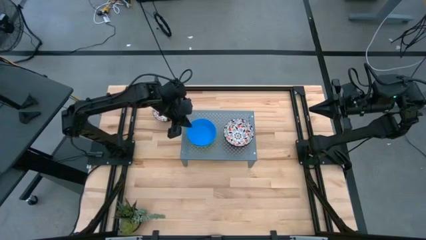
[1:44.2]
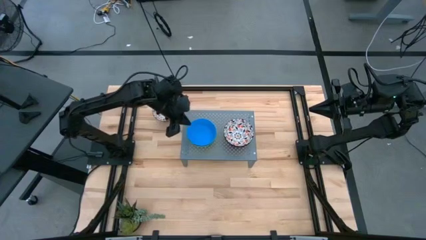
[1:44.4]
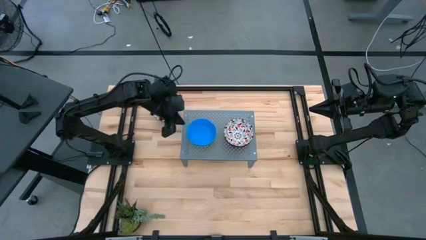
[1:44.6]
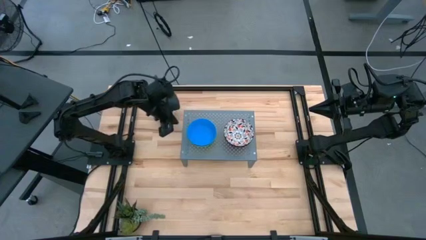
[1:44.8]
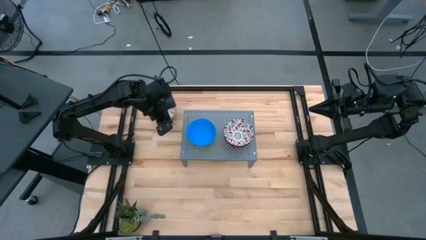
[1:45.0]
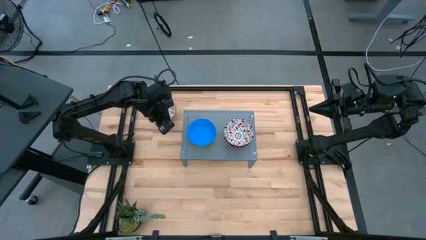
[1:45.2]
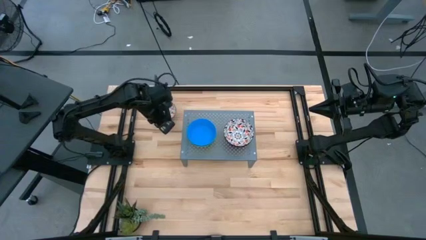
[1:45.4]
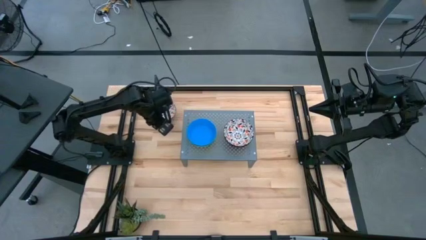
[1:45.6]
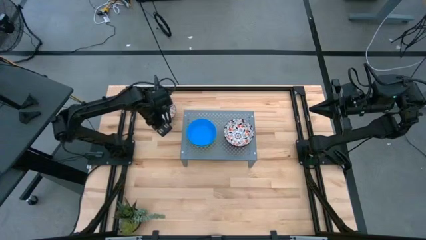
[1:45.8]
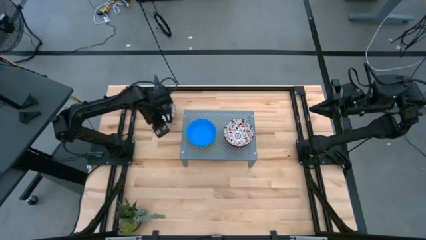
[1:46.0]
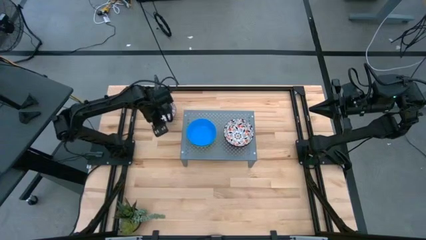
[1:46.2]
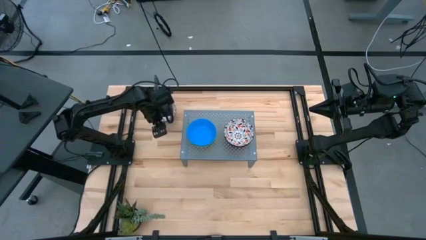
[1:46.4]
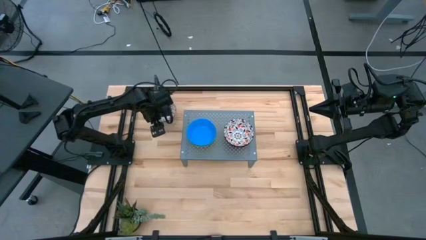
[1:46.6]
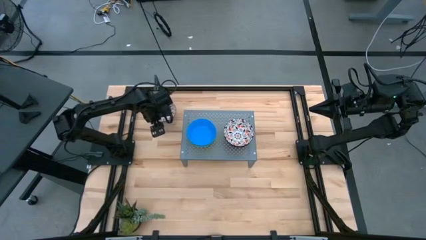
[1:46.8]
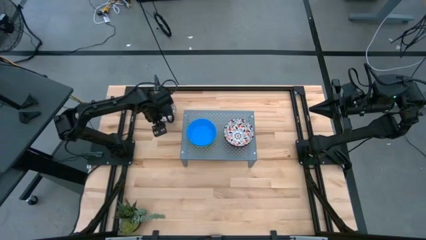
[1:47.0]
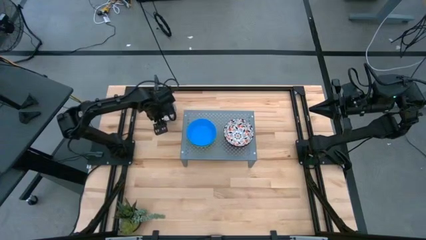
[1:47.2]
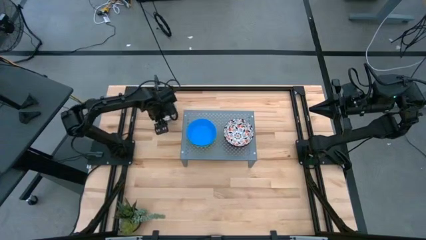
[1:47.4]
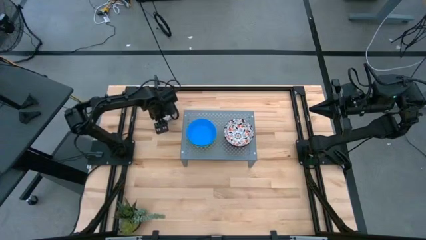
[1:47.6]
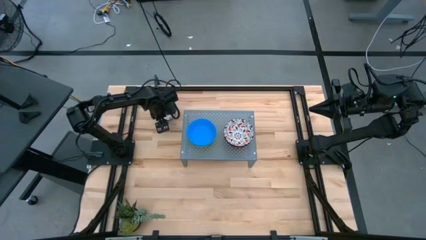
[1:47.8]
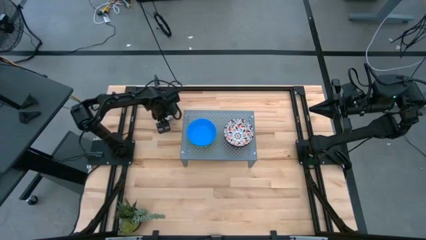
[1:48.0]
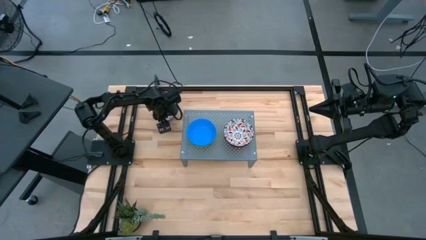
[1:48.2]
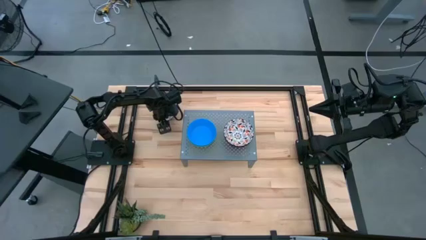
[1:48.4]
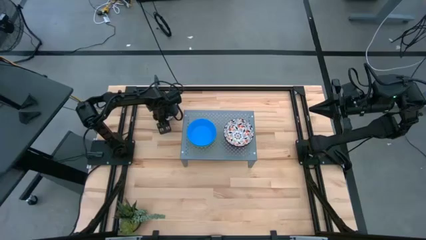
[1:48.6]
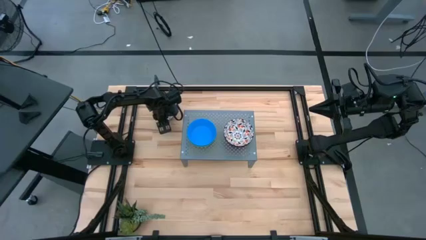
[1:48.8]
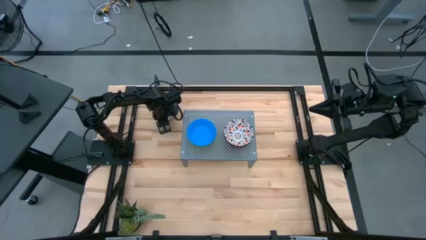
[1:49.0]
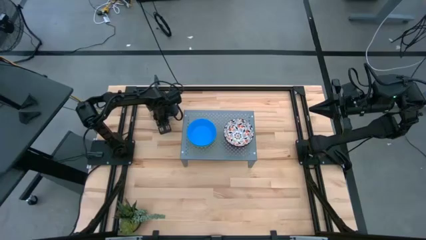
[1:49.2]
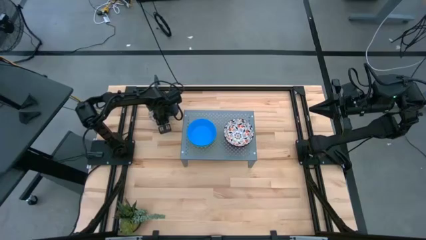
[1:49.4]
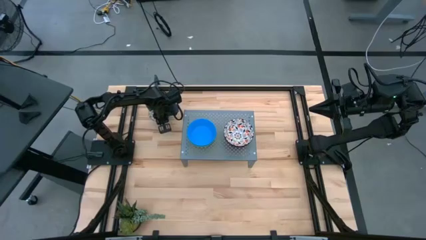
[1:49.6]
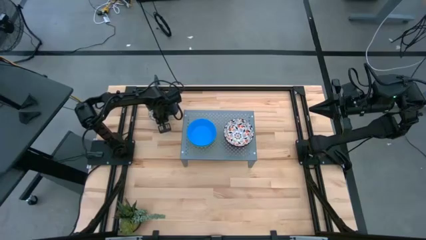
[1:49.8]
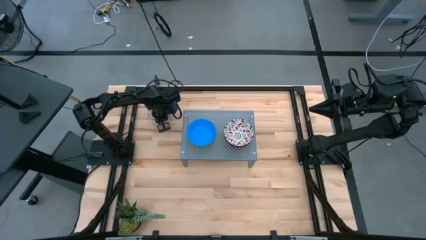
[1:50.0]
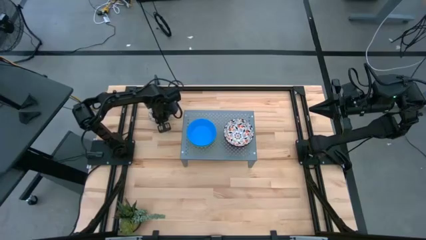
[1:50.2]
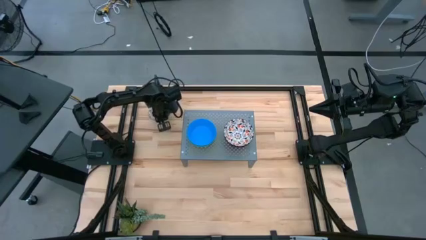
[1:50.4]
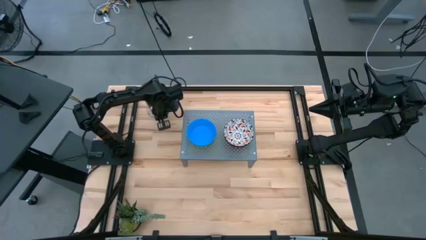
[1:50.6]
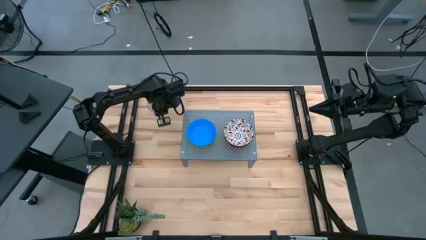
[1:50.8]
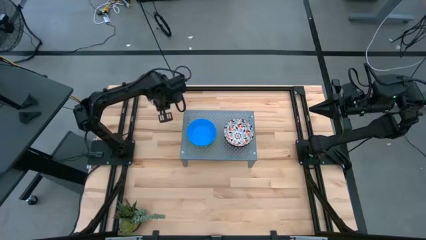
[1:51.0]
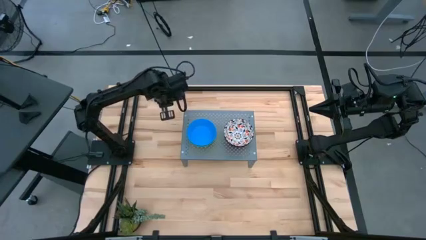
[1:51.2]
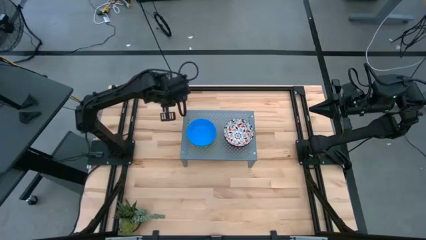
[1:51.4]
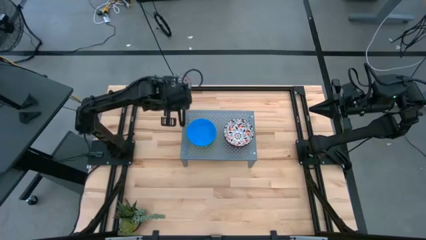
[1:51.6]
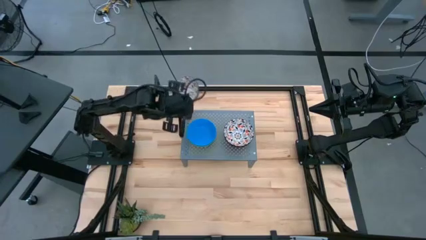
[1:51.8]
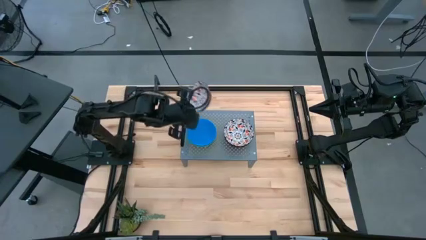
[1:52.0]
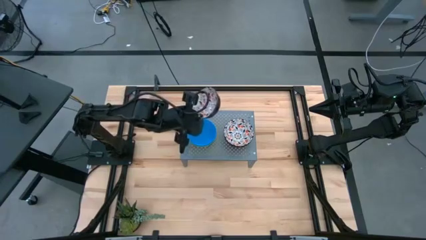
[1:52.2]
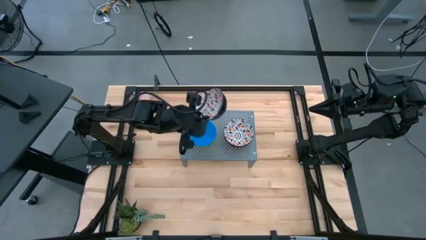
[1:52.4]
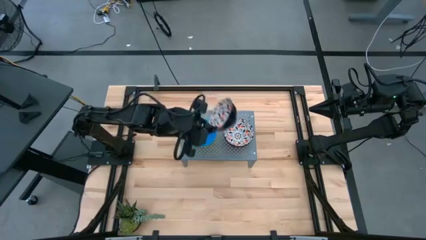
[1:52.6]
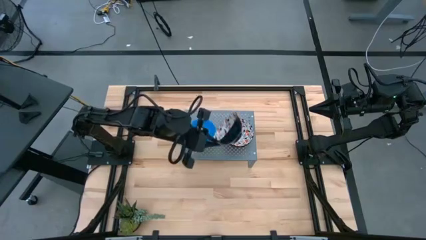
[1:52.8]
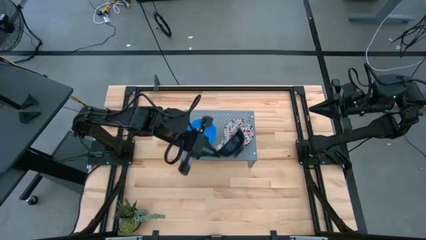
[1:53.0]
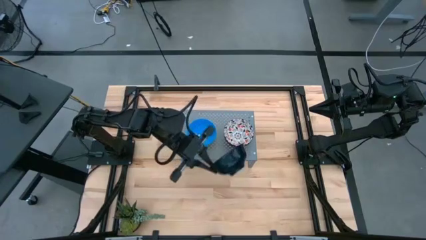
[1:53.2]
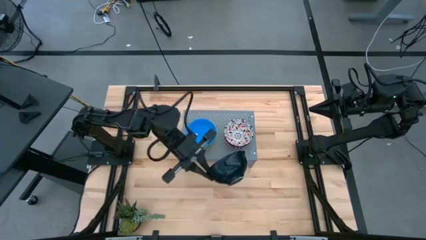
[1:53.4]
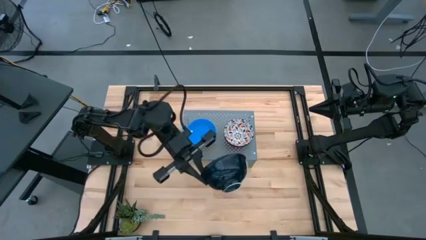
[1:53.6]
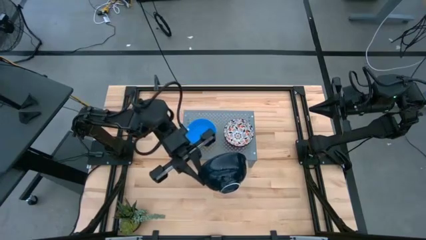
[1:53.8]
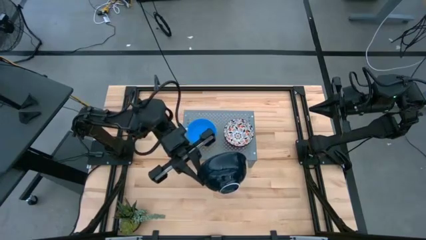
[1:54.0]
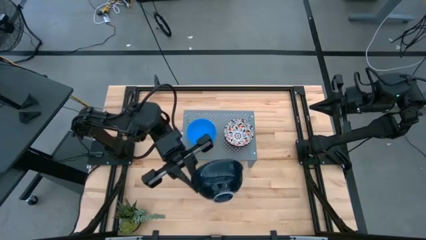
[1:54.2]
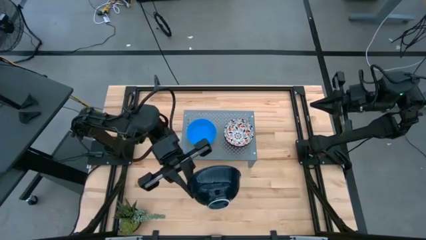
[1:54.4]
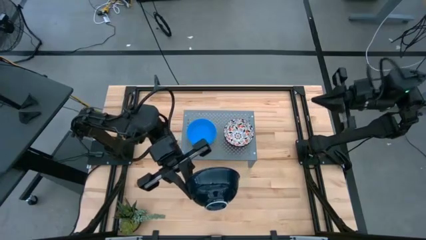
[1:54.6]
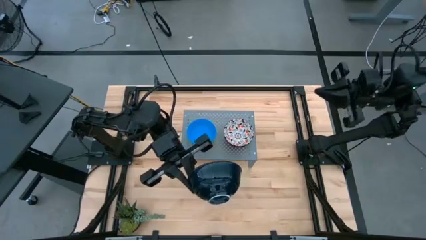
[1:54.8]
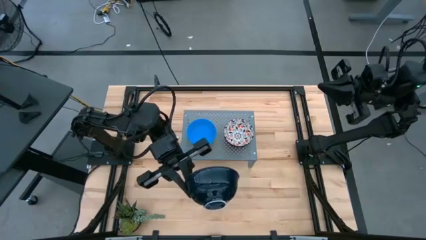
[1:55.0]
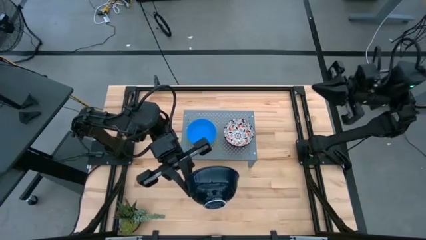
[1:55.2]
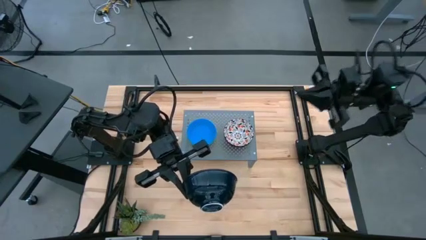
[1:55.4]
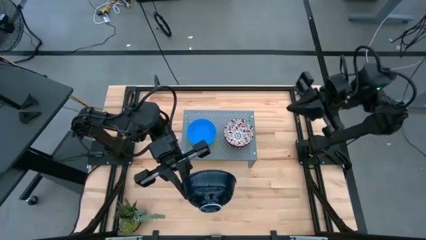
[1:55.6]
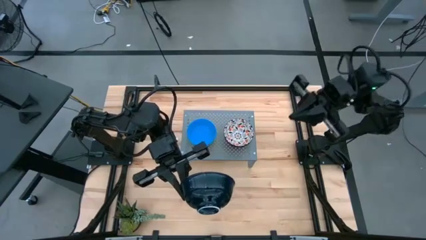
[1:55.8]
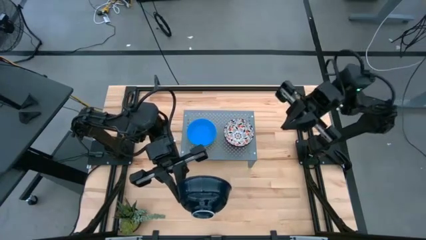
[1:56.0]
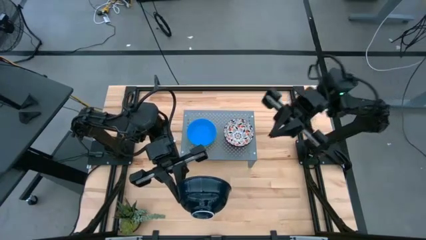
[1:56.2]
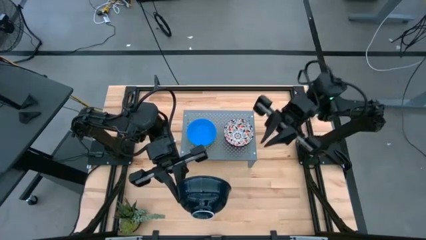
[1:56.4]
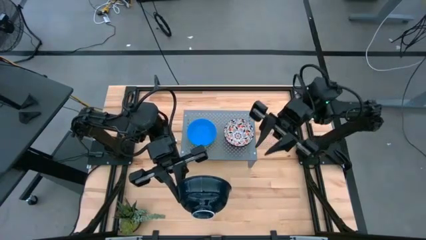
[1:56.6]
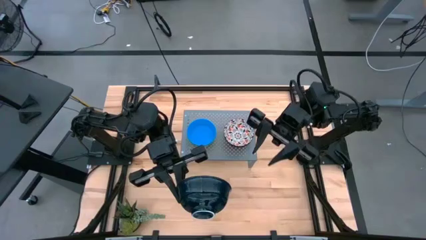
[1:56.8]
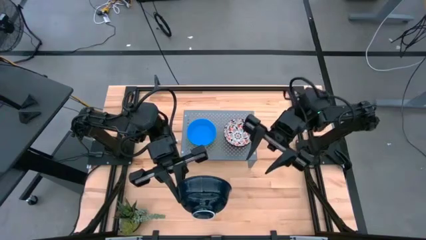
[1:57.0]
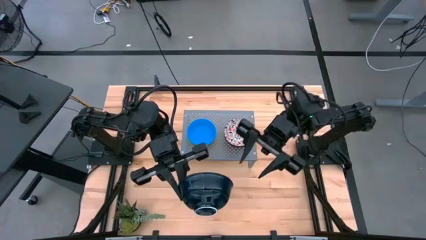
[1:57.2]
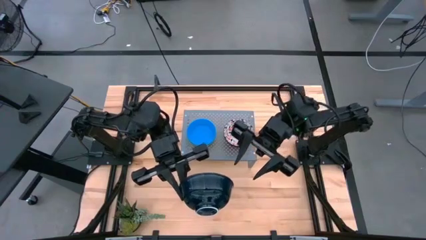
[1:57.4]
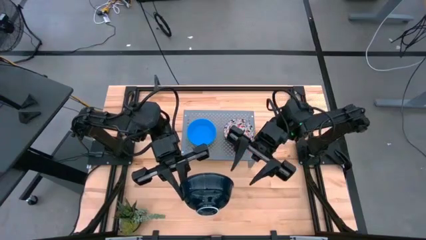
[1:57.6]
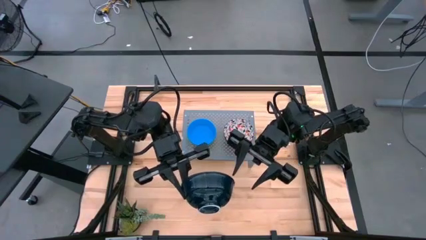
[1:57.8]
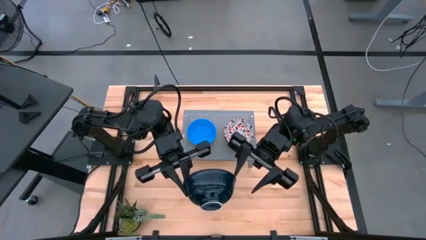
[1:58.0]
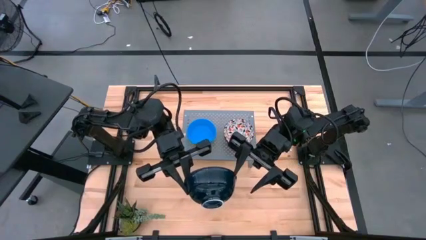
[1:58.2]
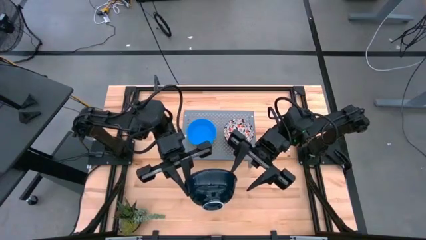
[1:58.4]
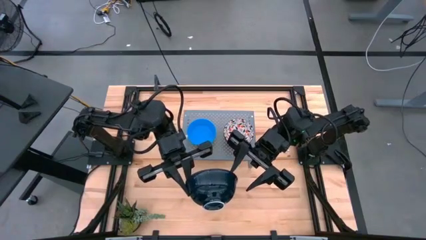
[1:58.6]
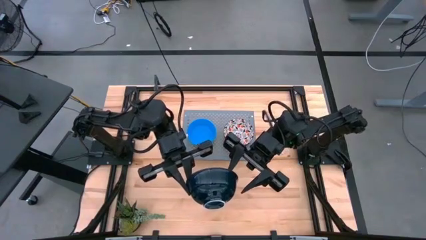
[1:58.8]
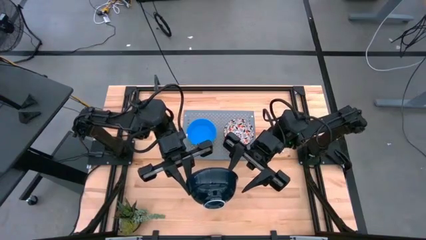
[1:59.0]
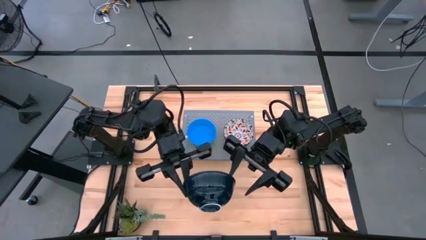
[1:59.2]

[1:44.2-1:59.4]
Task: Pick & Place Mini bowls
Stack the white patterned bowl on top of the white patterned bowl on the shelf

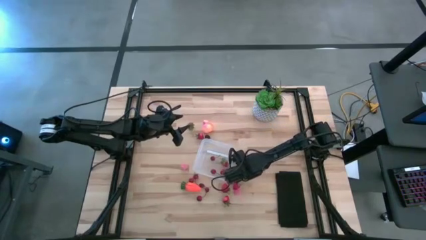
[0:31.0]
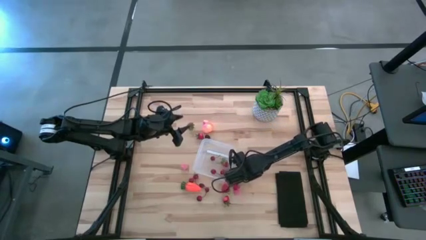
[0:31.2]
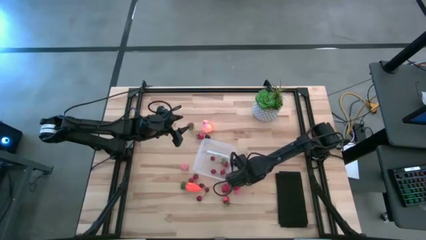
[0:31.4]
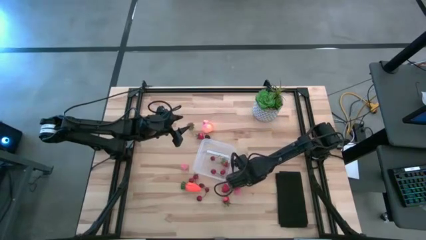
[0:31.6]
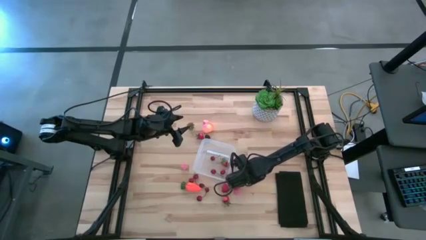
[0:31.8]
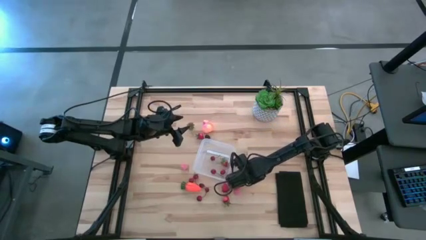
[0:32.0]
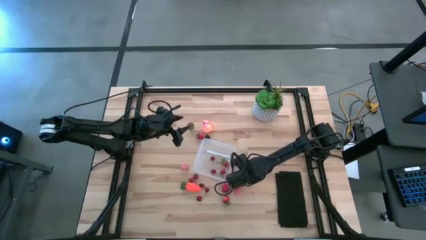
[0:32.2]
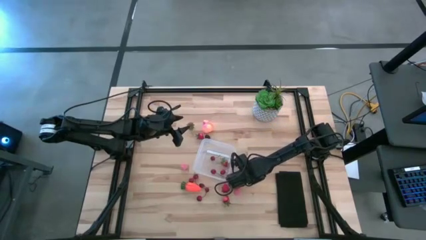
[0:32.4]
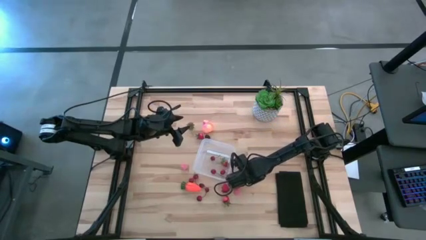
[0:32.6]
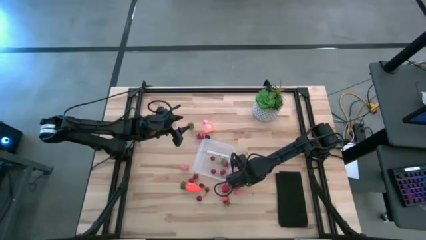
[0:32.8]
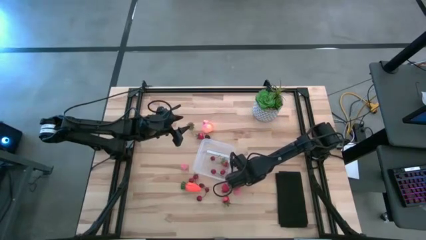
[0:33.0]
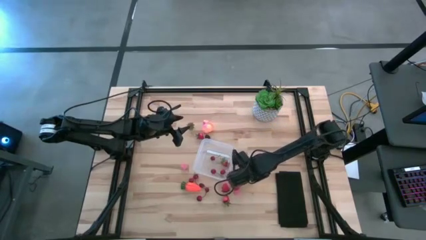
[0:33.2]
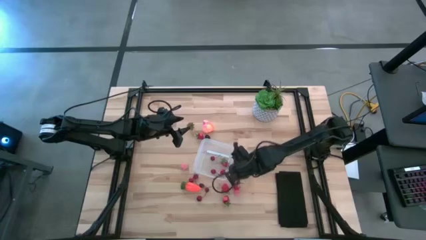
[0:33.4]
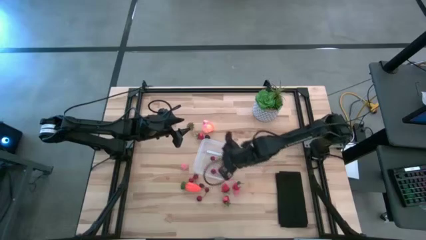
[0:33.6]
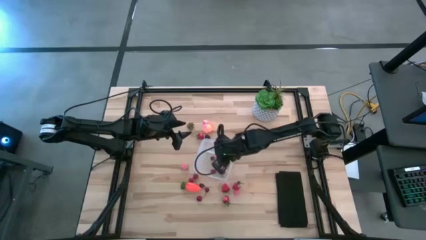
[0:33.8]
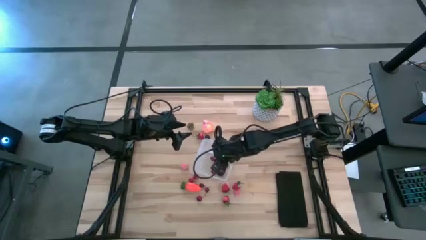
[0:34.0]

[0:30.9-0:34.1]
Task: Pick and placing Produce into tupperware
Put the red strawberry into the transparent container
